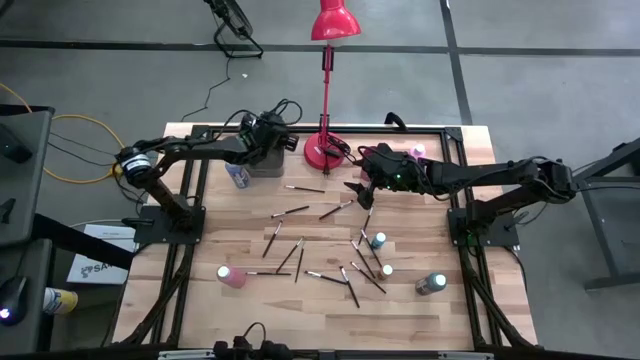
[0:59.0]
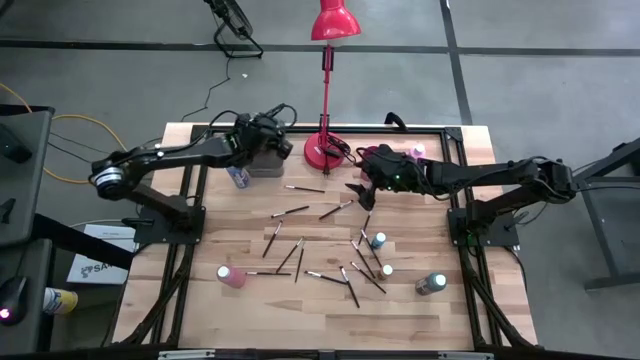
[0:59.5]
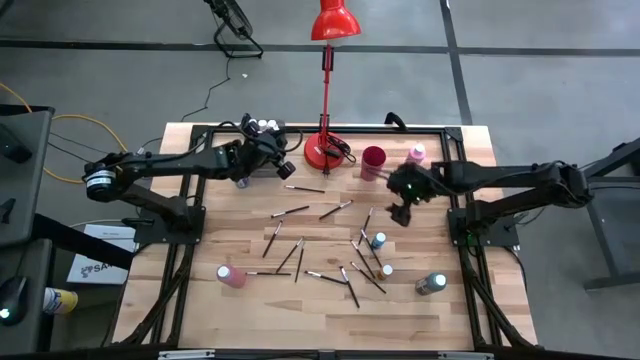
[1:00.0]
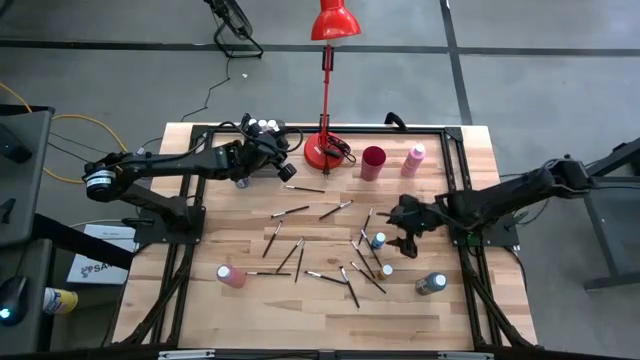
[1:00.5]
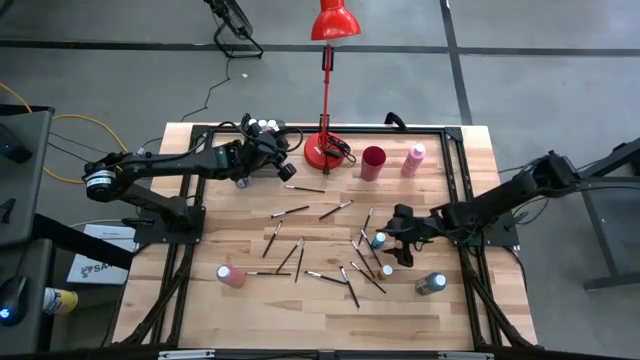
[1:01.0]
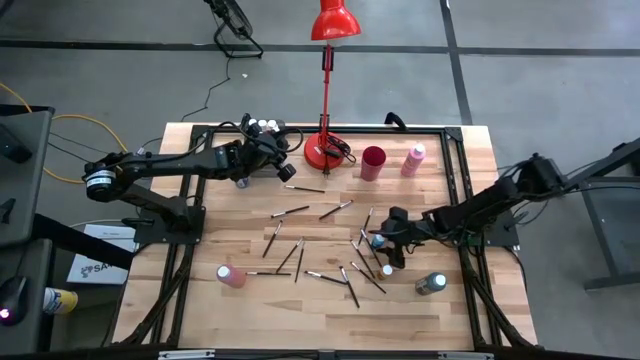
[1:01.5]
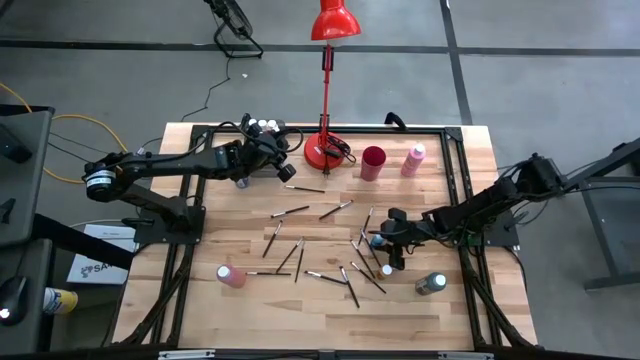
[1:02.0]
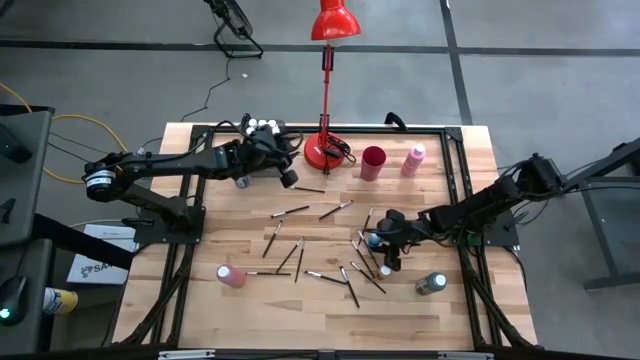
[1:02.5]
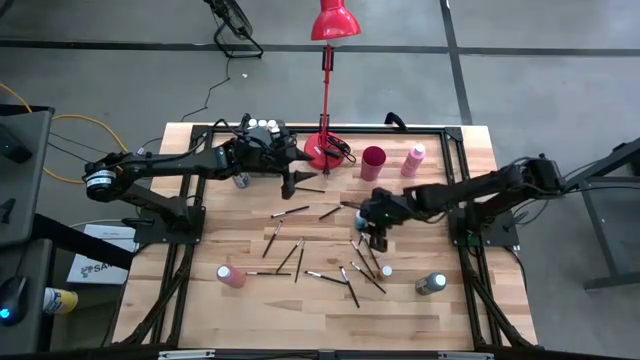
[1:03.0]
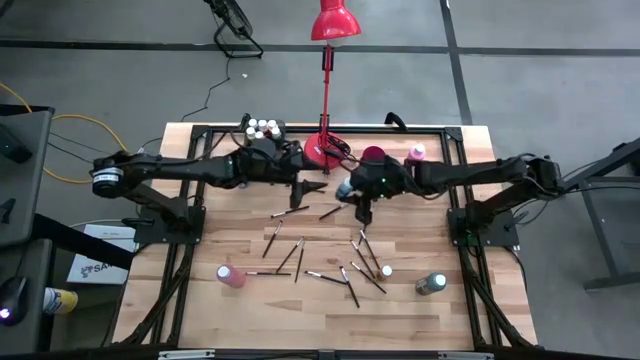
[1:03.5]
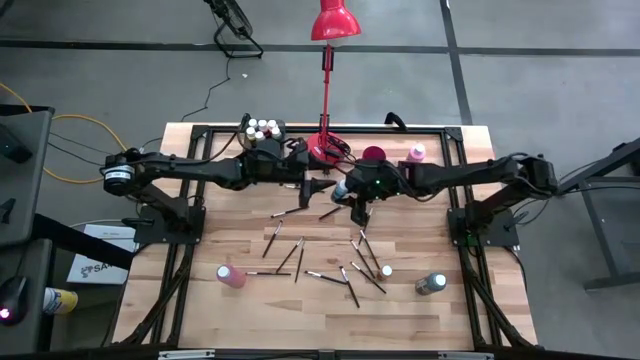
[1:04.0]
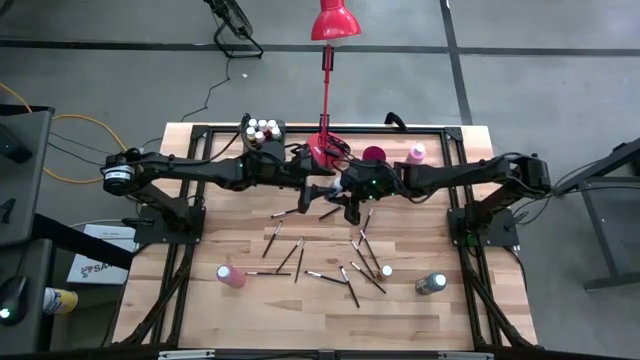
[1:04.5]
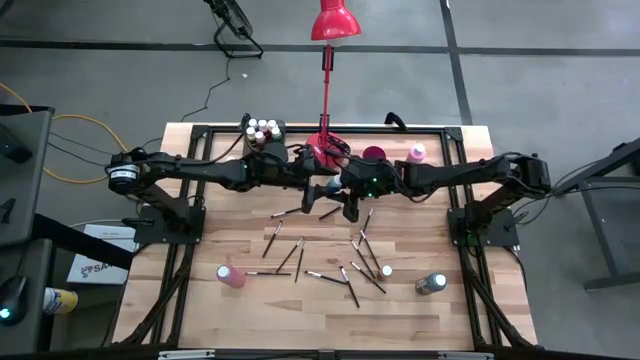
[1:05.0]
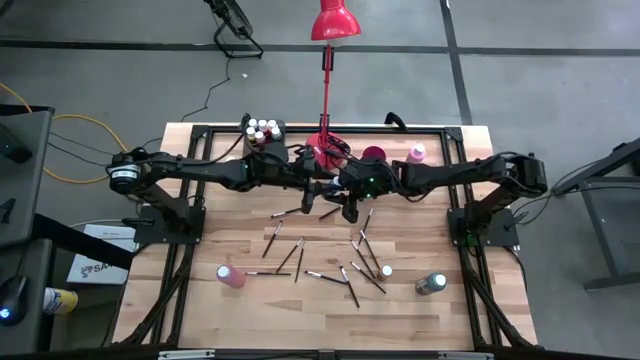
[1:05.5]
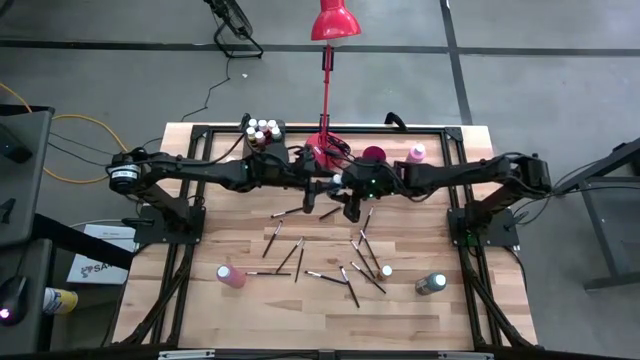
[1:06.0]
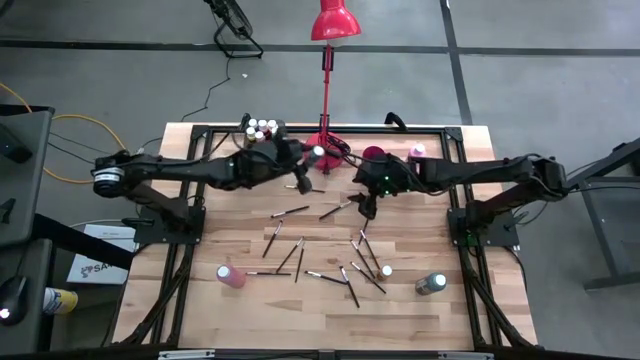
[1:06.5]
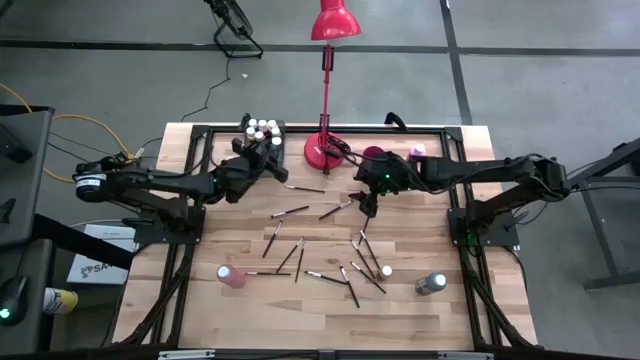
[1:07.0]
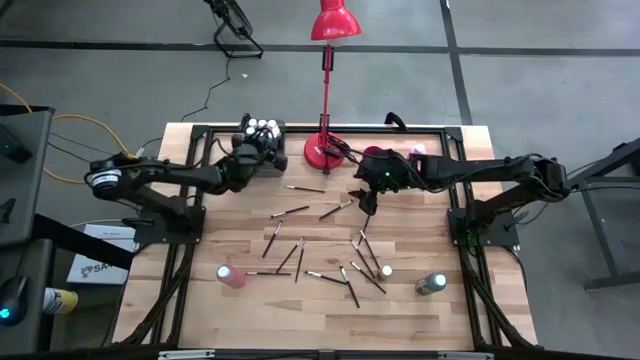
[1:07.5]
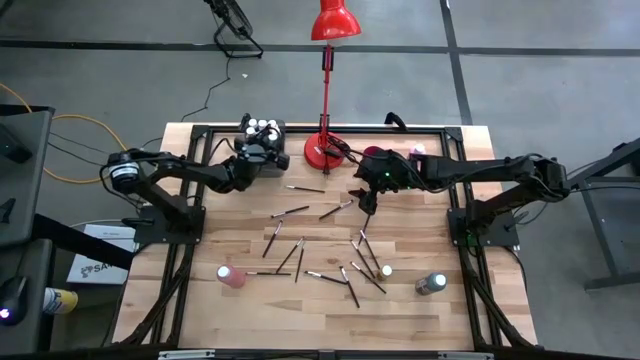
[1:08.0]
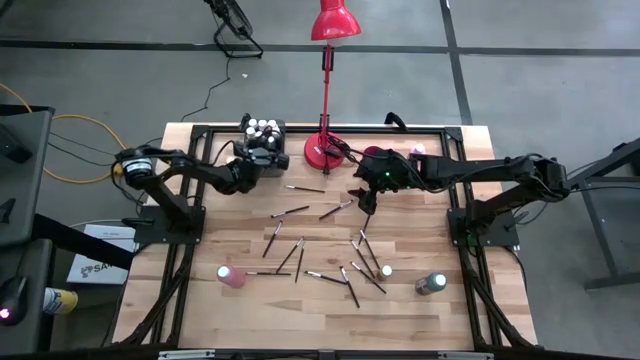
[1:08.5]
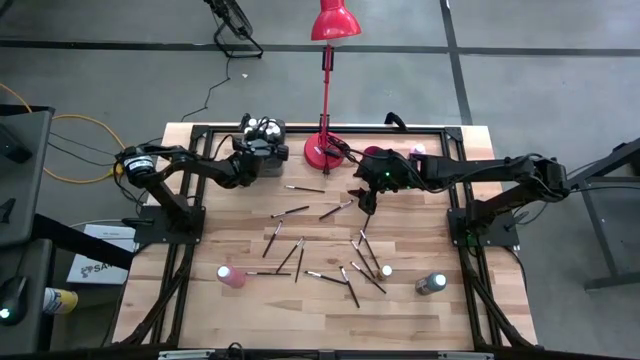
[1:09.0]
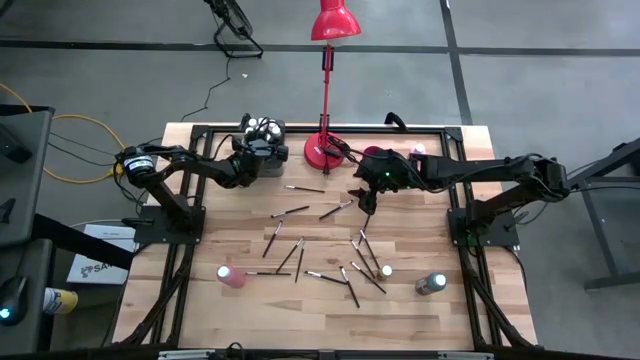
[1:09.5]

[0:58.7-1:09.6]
Task: Pick & Place Paint Supplies
Put the small light blue black paint bottle into the bin

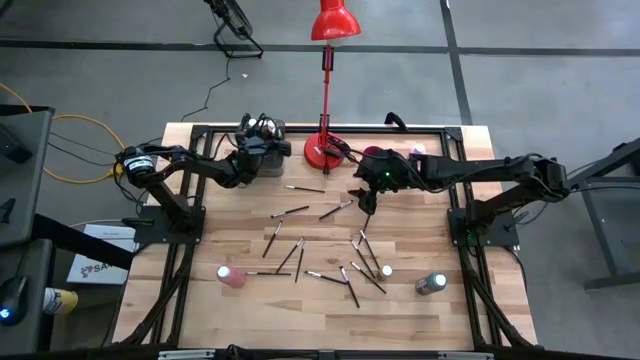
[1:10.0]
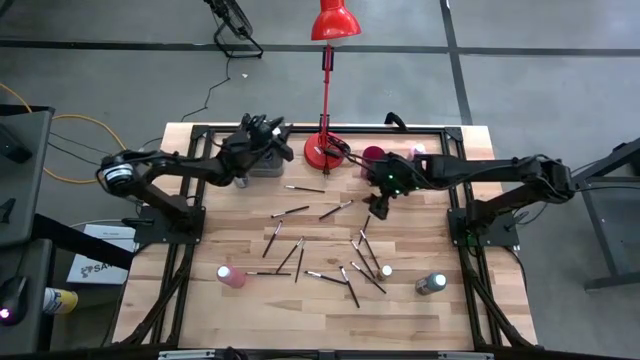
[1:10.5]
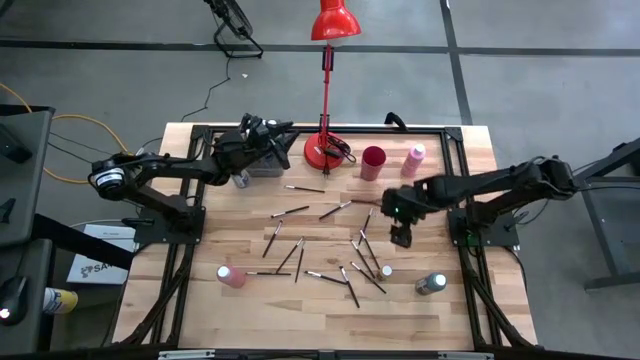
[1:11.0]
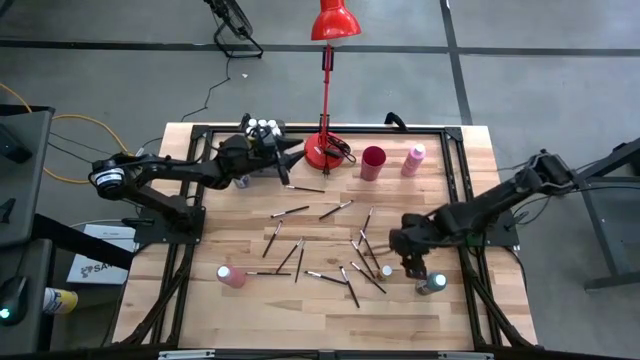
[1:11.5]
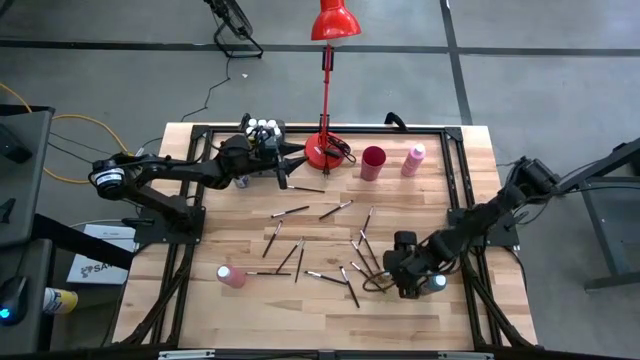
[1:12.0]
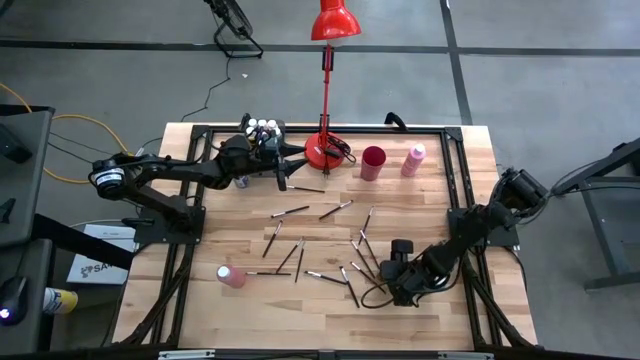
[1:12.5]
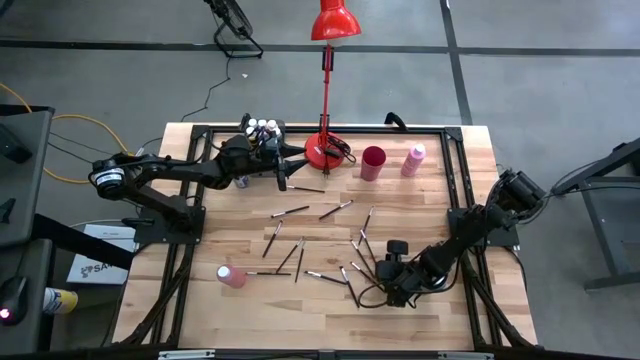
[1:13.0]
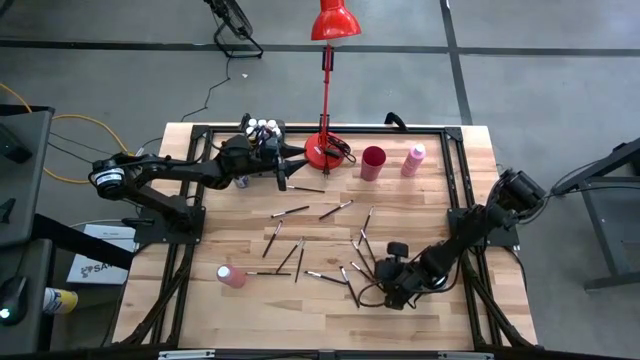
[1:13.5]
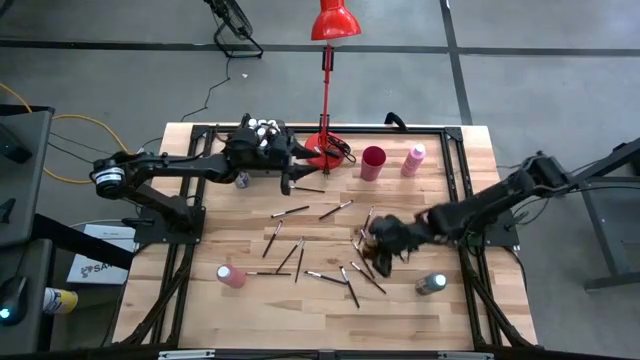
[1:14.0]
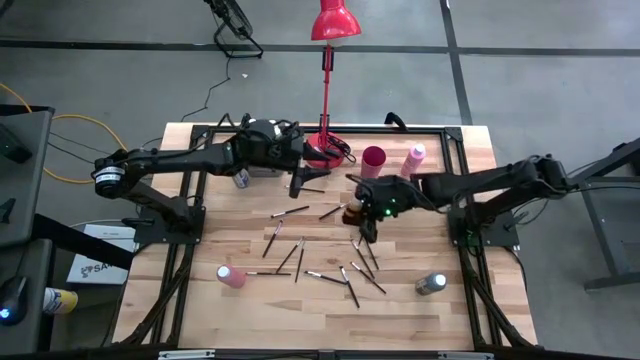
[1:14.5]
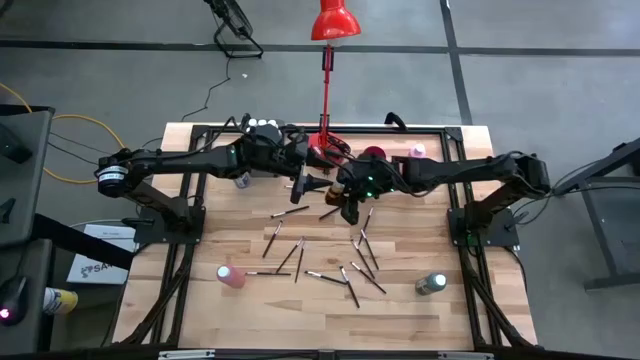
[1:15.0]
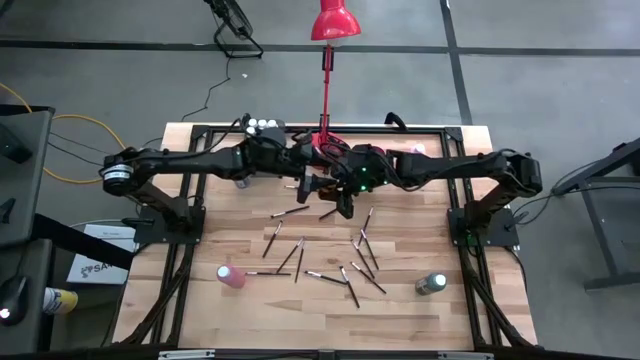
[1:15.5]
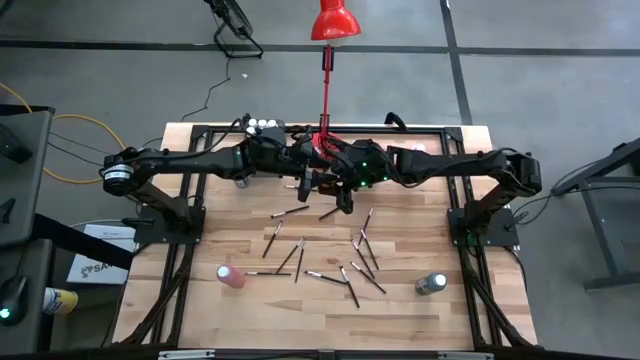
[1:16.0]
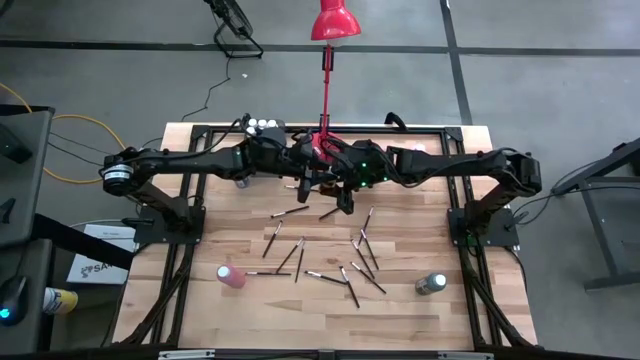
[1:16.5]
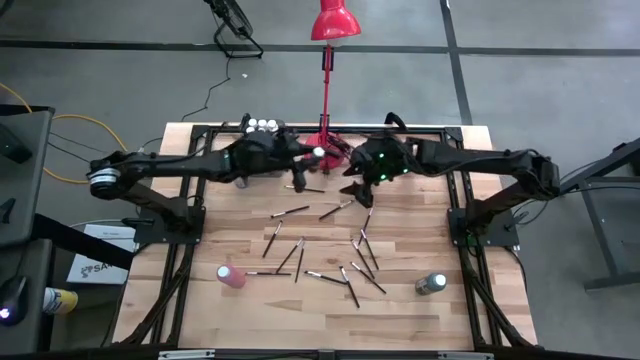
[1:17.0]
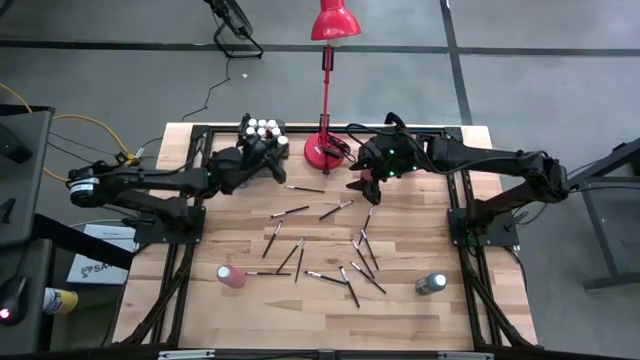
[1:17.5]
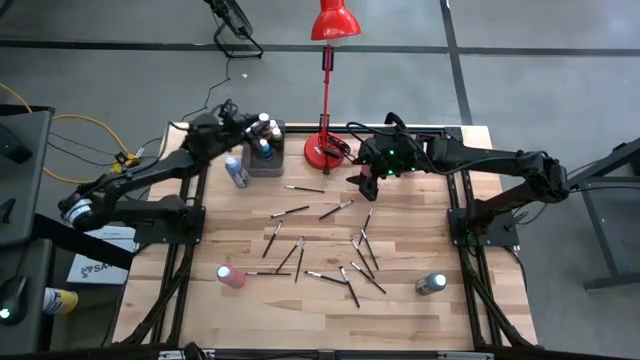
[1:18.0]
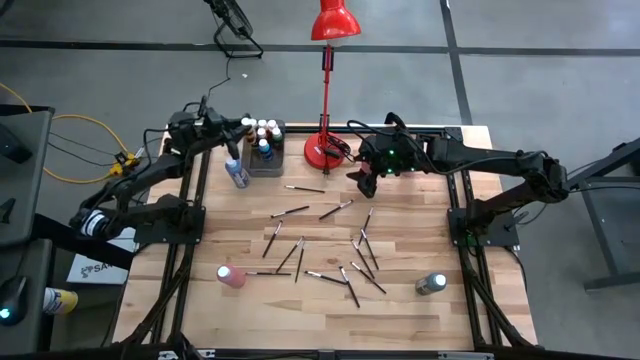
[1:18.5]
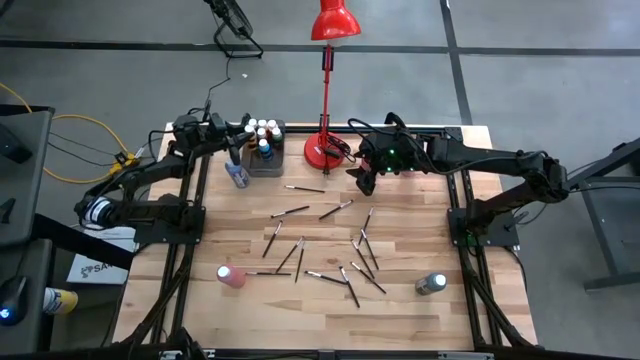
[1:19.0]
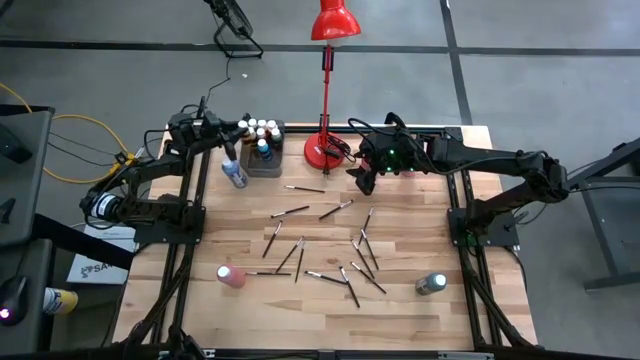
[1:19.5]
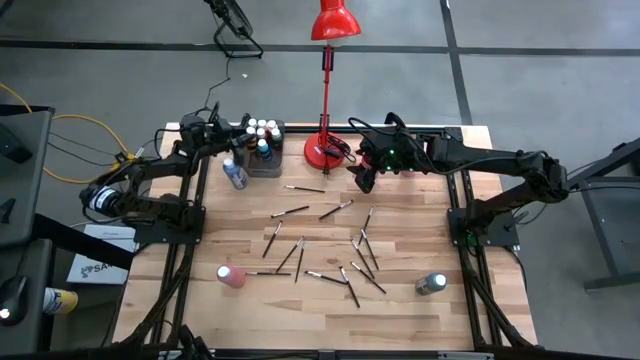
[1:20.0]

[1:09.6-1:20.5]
Put the small dark yellow black paint bottle into the bin
